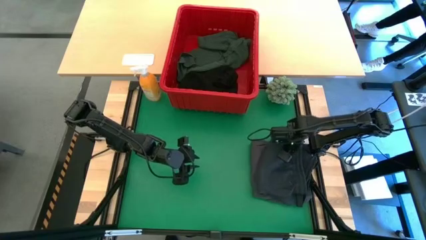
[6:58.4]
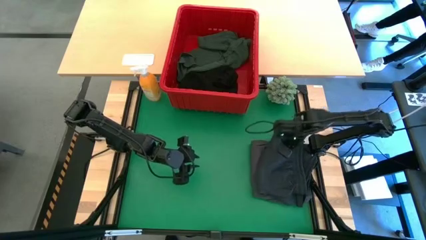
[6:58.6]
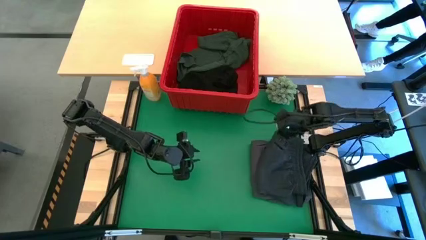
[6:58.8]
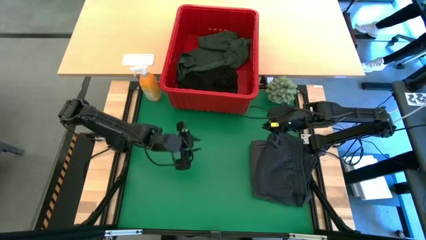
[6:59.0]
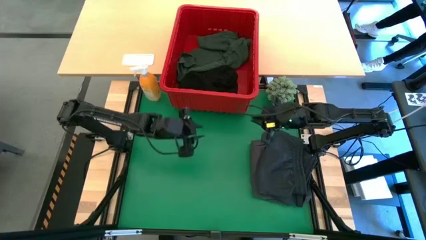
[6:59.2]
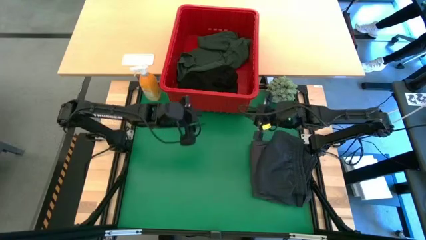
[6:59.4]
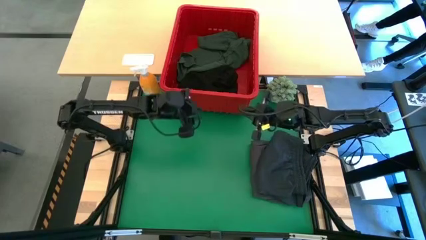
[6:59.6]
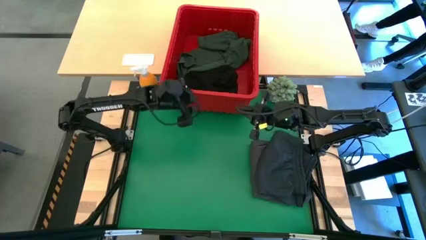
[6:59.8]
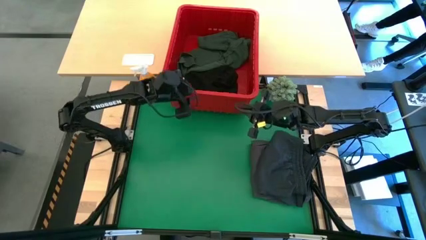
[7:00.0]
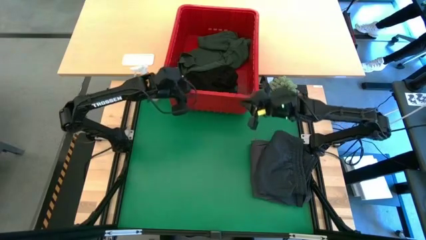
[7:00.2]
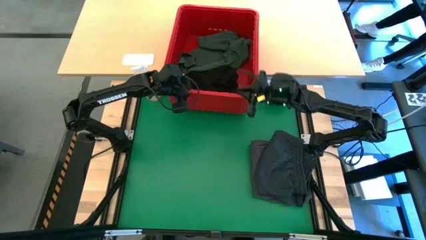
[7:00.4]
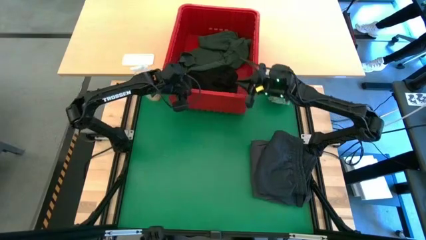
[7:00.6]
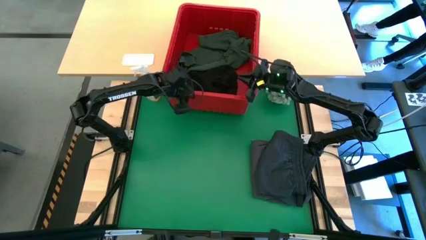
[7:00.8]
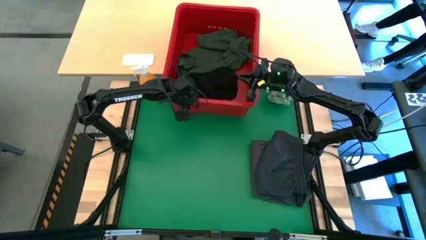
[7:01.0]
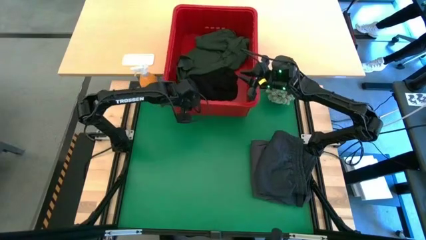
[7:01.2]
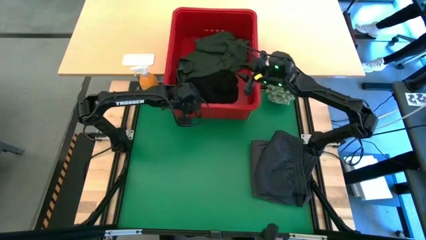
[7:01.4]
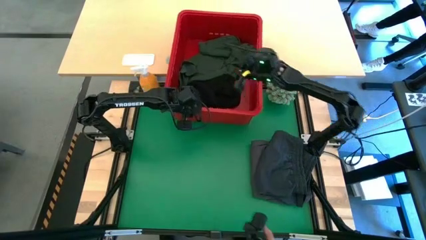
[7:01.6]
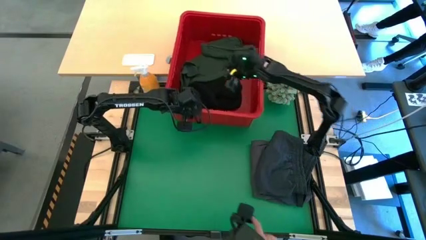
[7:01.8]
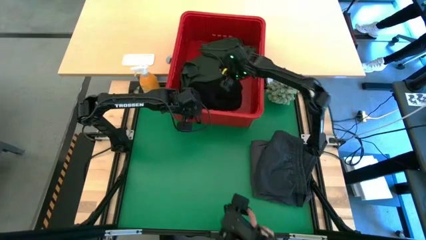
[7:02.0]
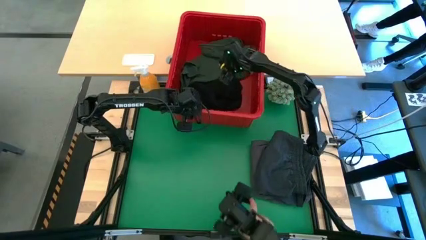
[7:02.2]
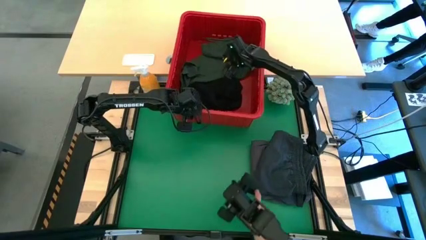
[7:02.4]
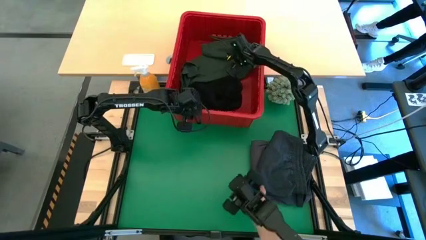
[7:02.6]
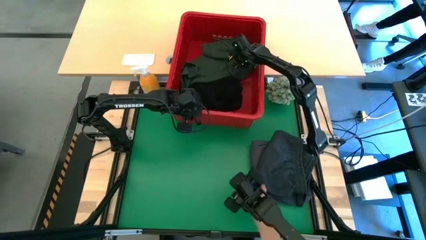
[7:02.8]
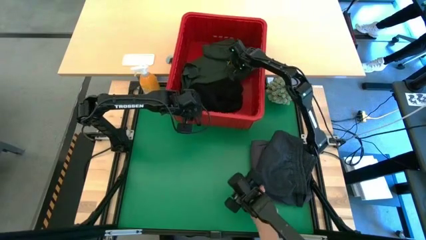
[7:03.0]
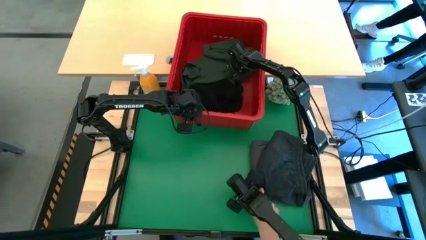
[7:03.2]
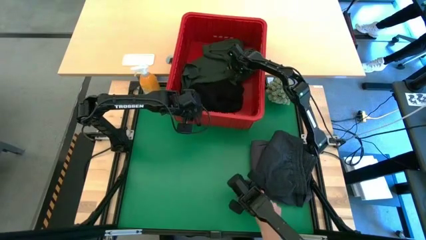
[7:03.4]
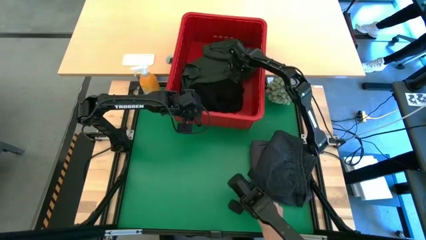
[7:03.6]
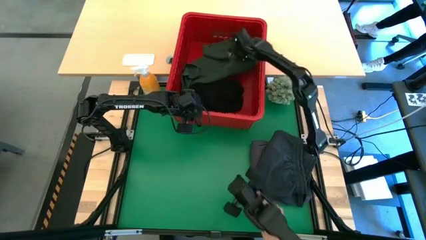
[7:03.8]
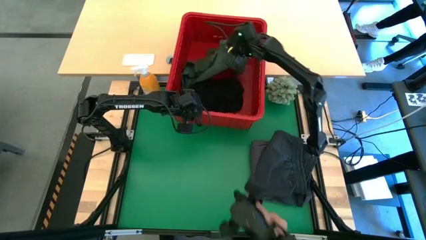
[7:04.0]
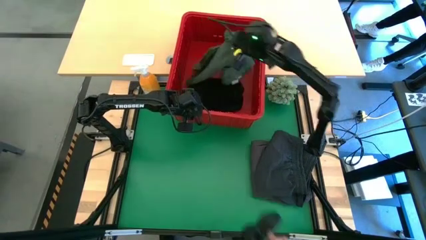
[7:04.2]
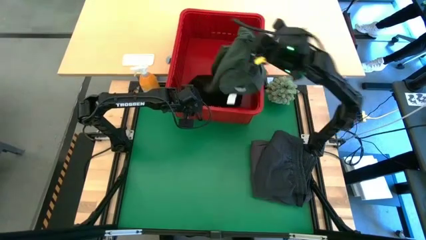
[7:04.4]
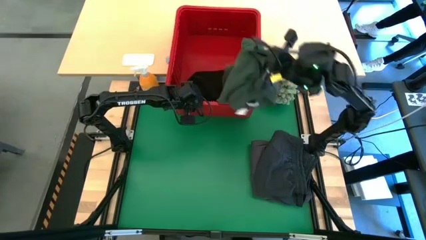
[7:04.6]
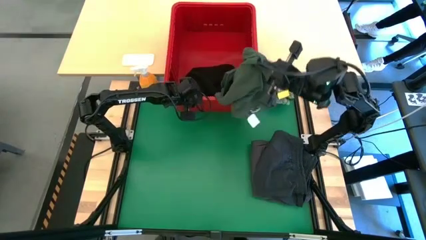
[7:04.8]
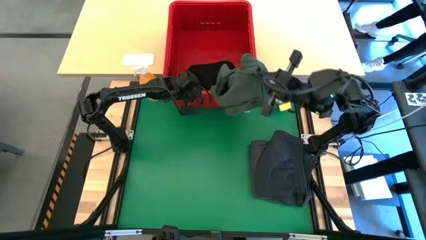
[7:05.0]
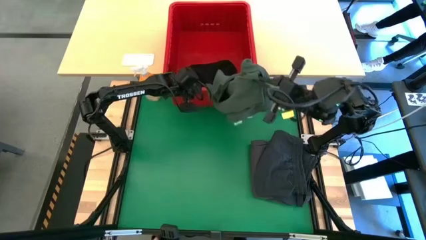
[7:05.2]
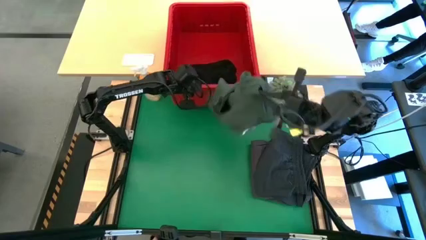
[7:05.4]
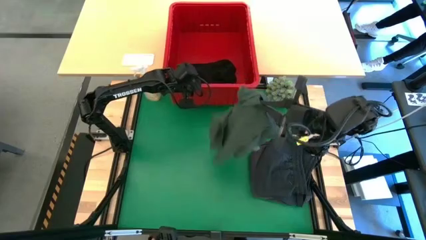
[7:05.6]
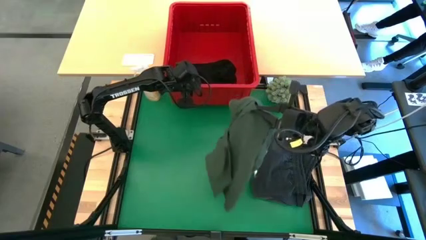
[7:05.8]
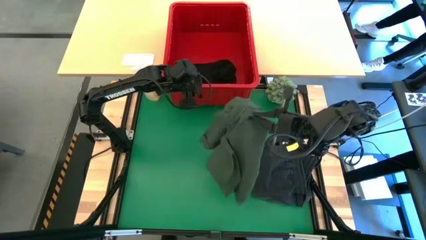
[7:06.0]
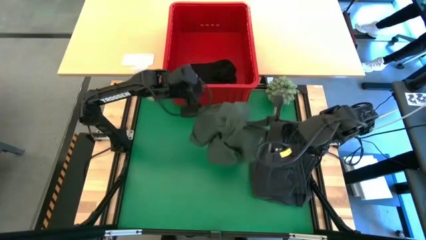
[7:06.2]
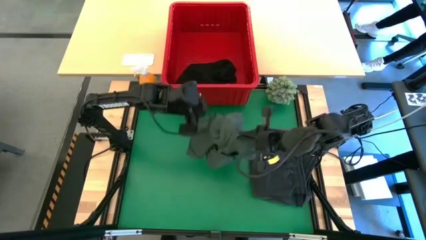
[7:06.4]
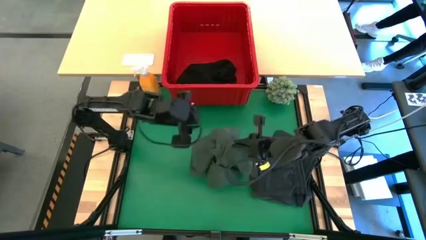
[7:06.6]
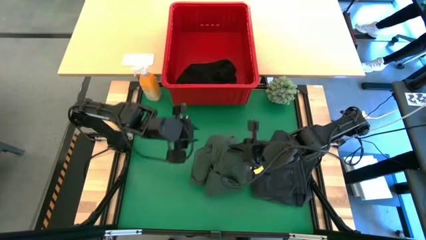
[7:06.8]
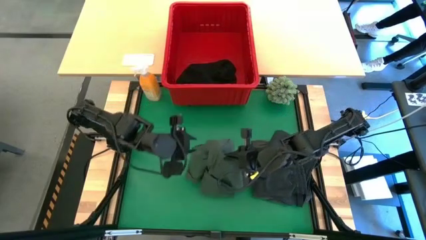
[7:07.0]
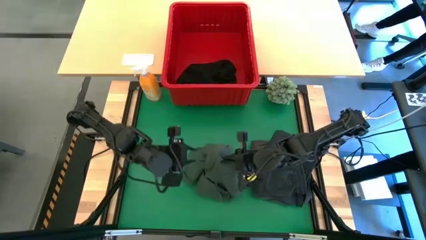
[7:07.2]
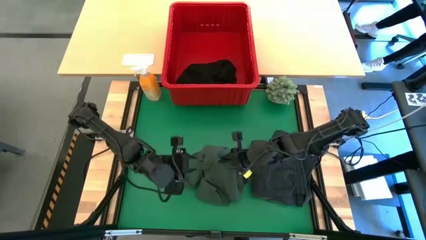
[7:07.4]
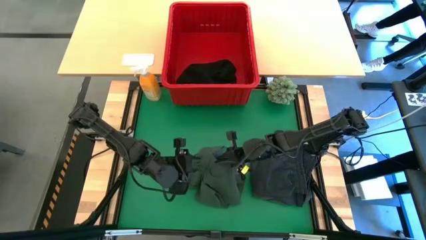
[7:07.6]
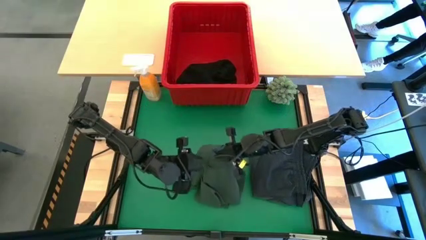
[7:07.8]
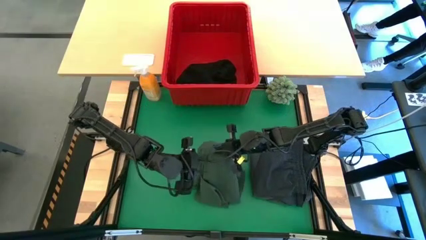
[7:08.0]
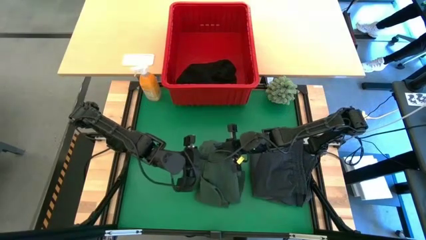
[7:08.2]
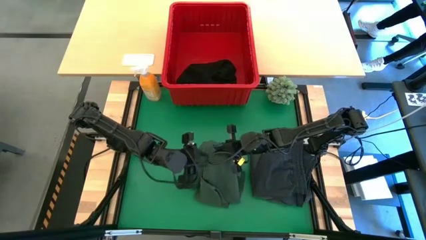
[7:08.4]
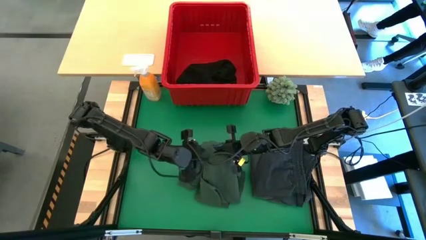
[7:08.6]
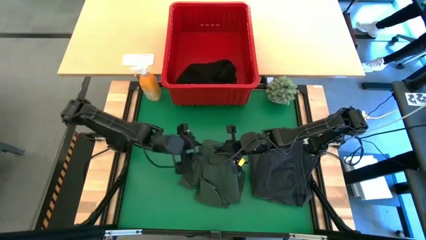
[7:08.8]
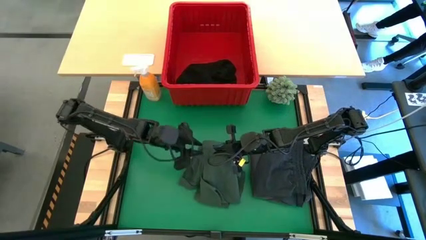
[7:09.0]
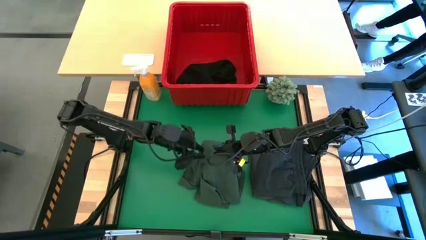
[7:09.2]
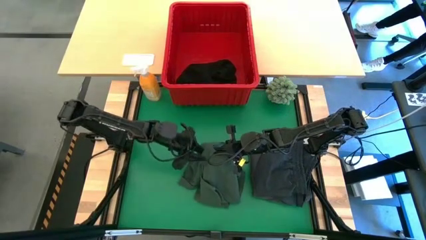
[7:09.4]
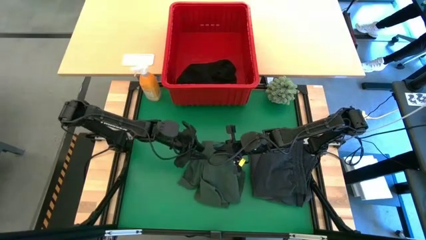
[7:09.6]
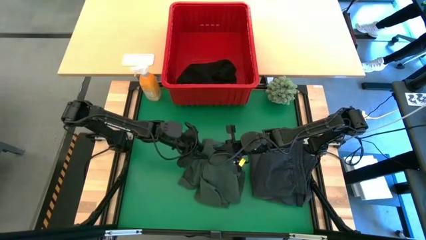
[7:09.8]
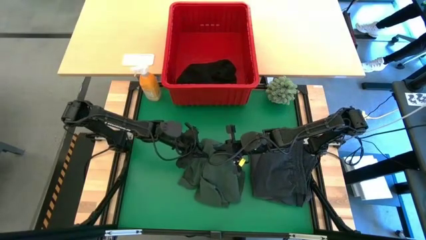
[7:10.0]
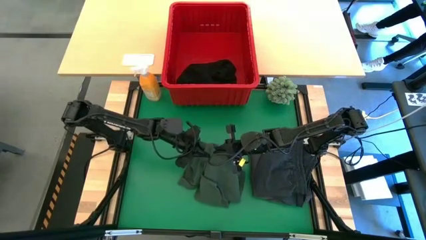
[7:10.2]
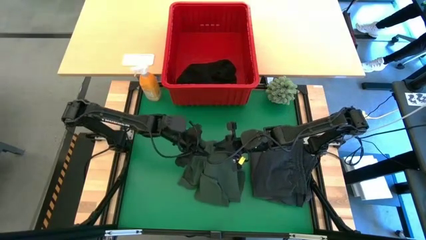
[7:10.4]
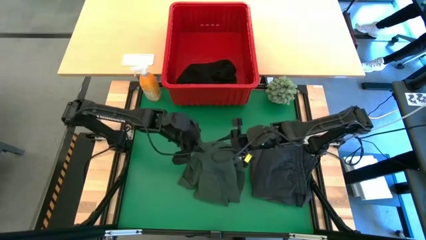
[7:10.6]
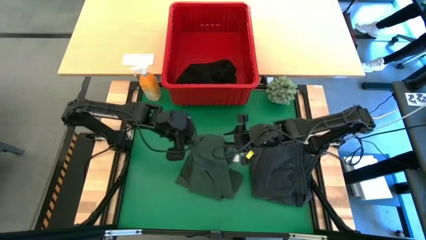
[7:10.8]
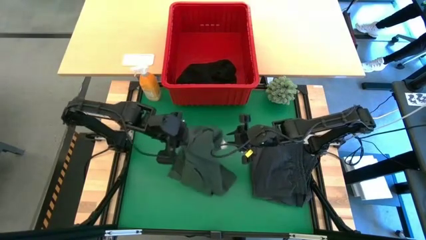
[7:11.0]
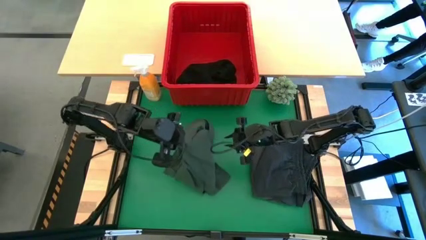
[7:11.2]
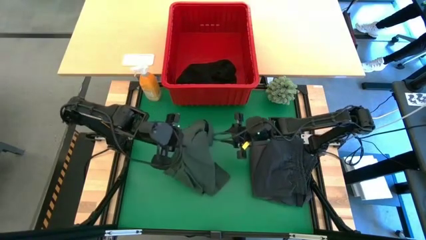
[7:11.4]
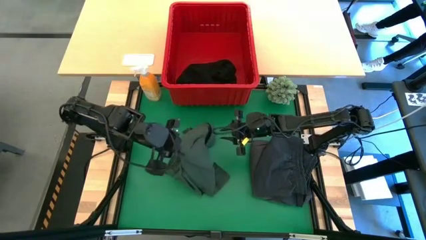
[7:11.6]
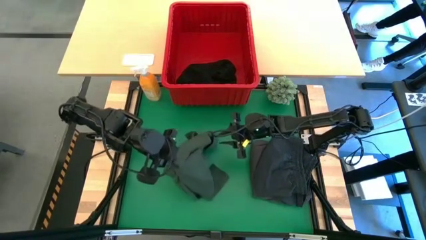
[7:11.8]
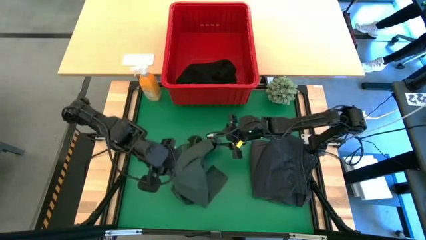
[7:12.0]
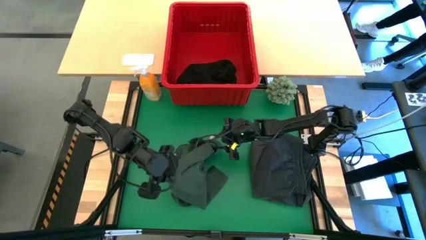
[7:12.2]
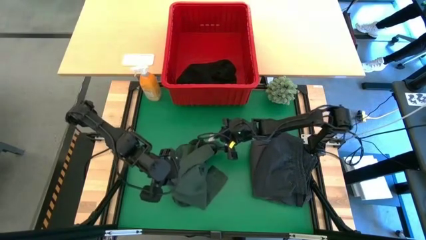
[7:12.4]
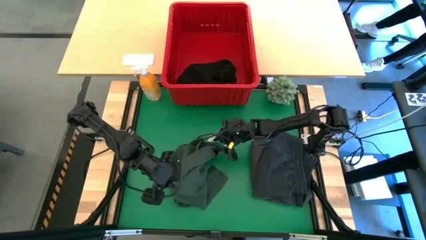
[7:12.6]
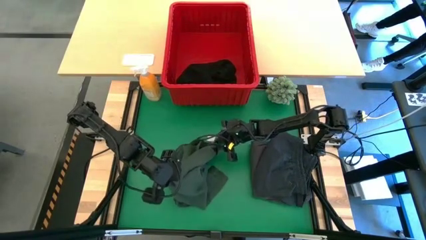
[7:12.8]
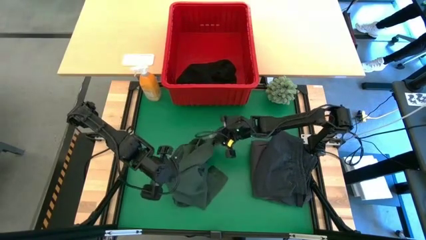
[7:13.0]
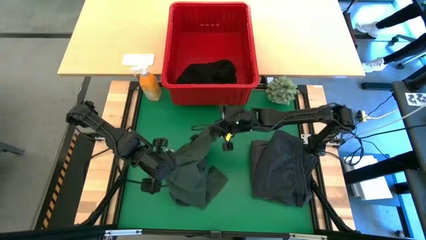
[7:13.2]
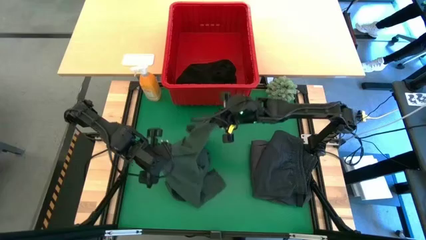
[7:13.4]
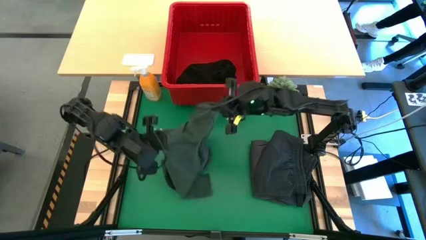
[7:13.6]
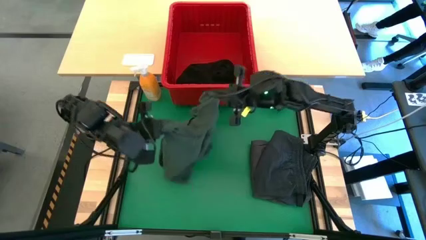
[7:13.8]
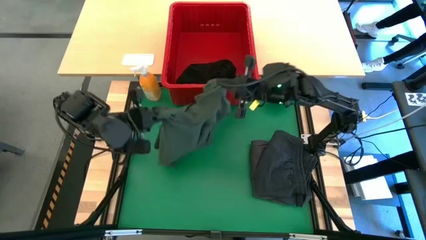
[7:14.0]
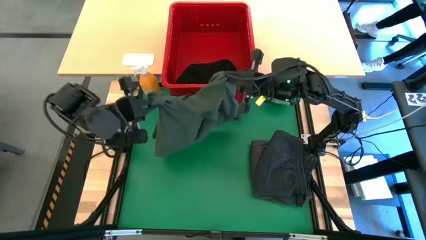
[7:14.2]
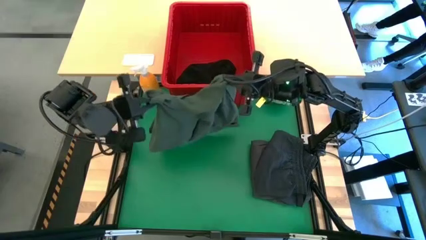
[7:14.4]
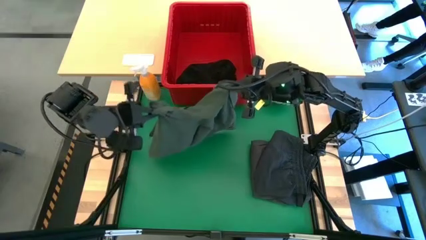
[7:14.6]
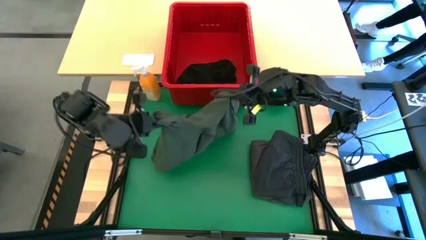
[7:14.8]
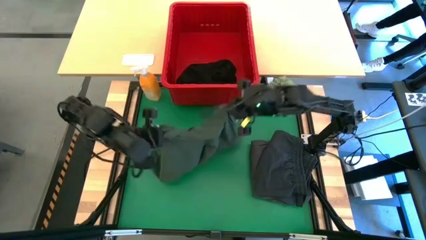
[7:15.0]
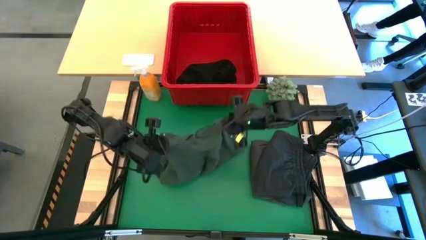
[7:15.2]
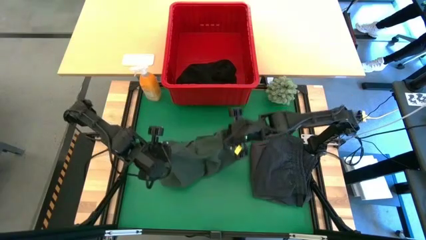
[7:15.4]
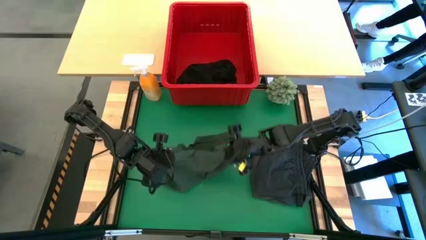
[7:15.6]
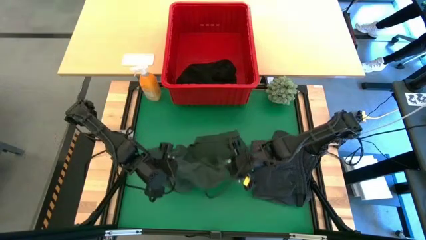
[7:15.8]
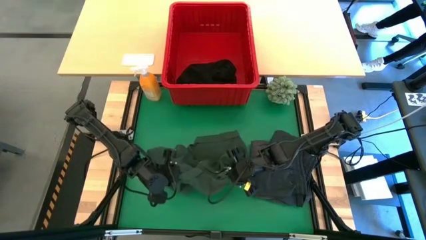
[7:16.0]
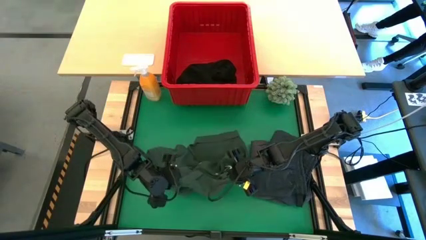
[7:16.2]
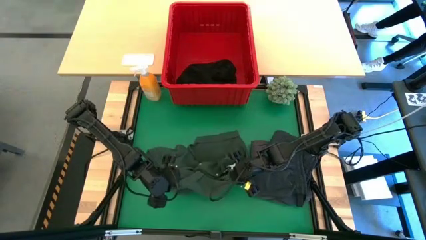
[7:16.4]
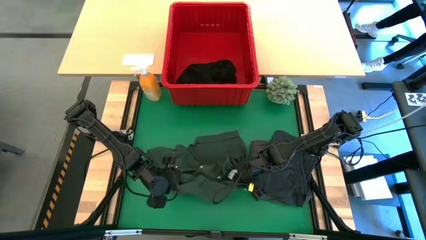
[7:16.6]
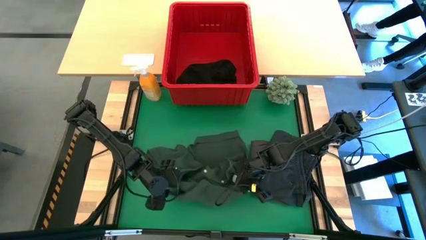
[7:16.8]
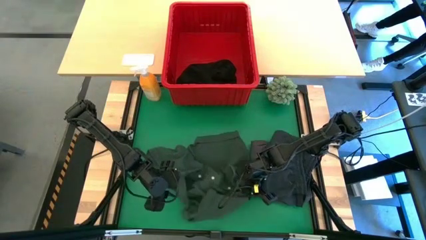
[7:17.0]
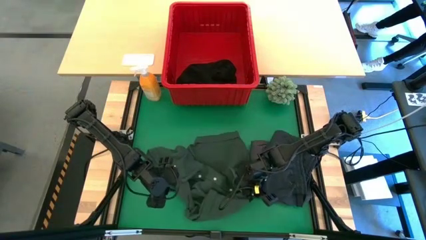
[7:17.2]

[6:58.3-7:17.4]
Task: Fold Laundry from Bin
Remove the green polo from the red bin
